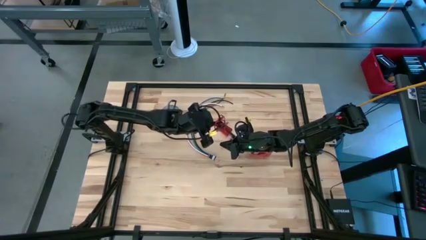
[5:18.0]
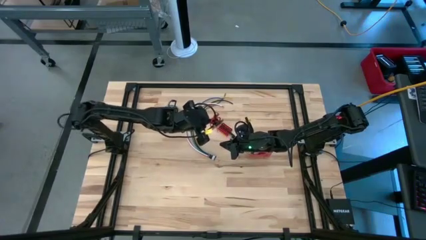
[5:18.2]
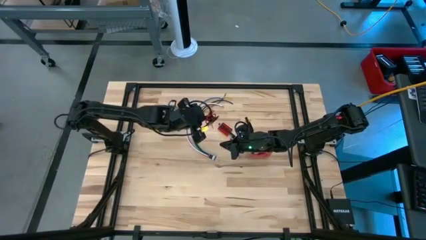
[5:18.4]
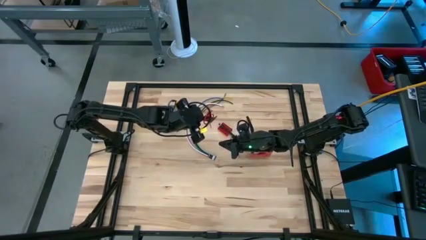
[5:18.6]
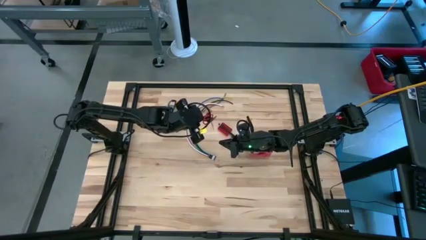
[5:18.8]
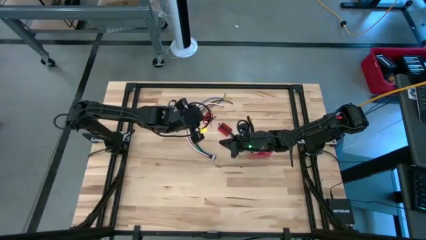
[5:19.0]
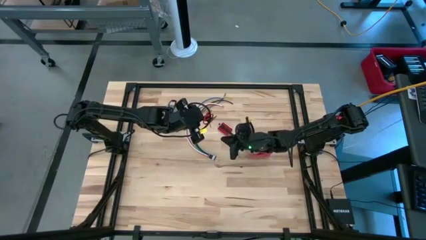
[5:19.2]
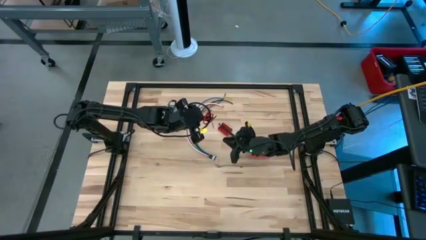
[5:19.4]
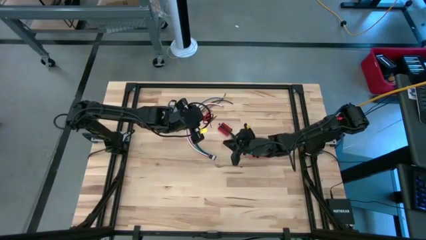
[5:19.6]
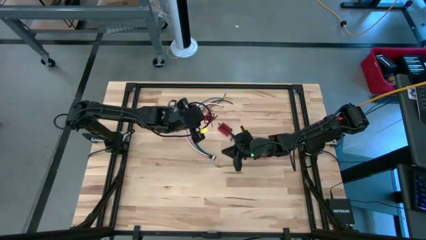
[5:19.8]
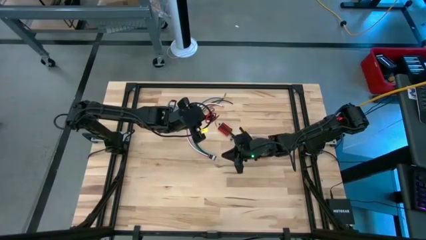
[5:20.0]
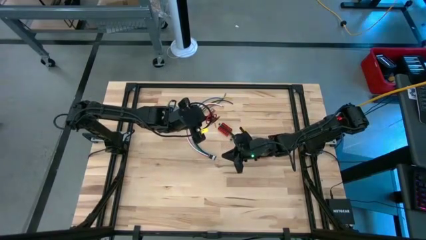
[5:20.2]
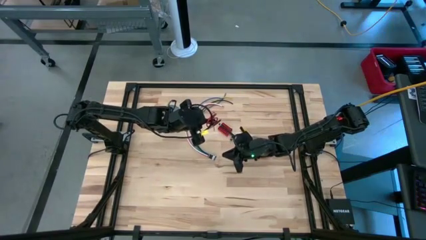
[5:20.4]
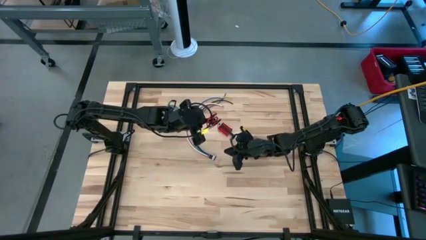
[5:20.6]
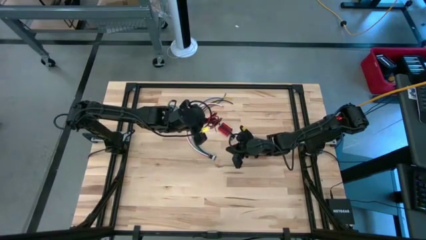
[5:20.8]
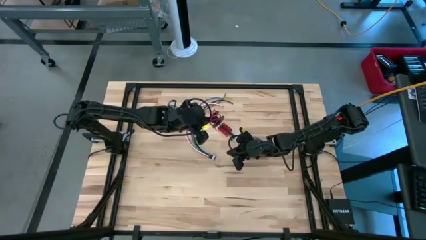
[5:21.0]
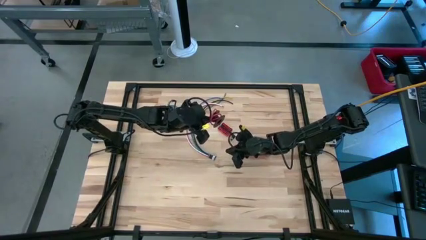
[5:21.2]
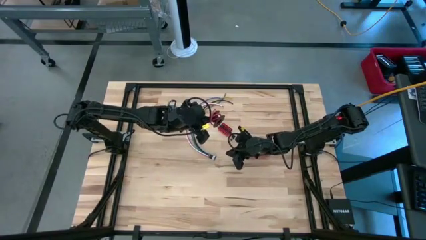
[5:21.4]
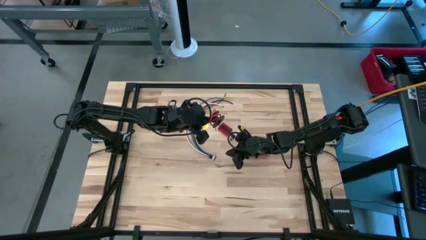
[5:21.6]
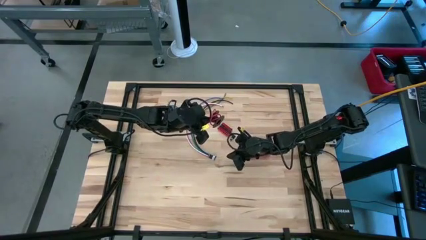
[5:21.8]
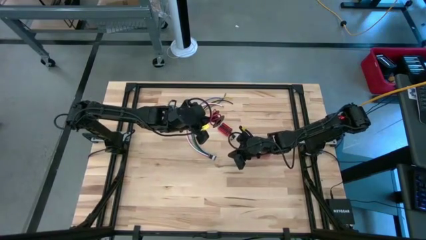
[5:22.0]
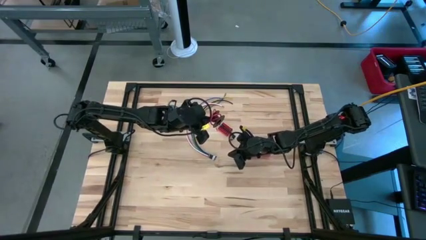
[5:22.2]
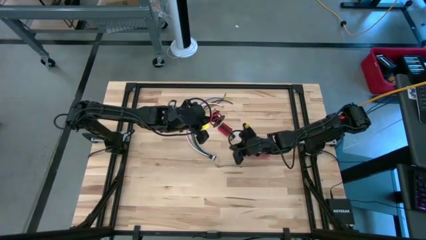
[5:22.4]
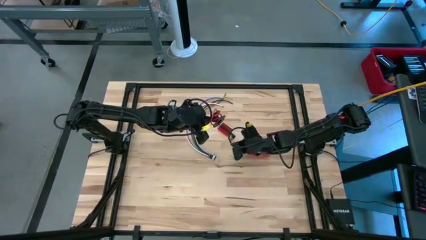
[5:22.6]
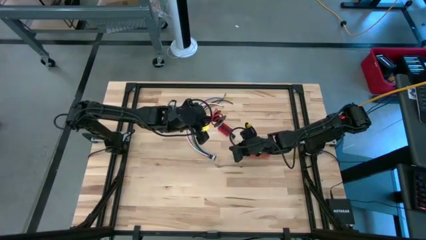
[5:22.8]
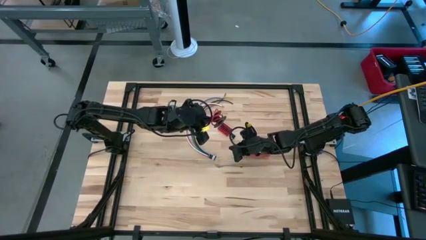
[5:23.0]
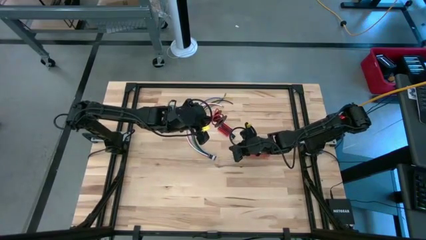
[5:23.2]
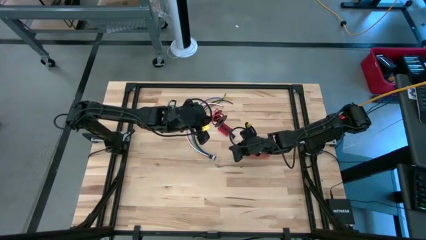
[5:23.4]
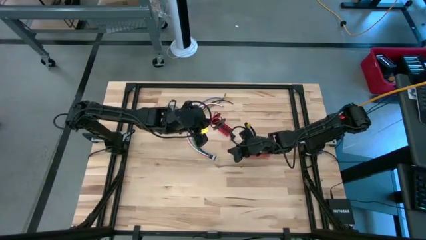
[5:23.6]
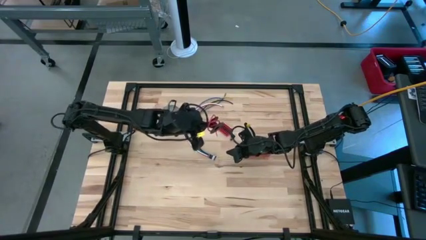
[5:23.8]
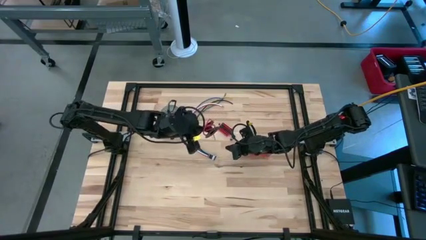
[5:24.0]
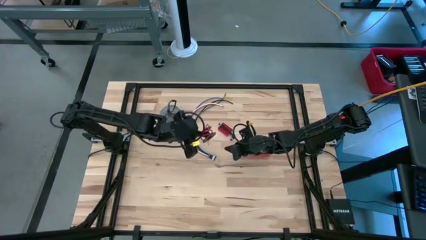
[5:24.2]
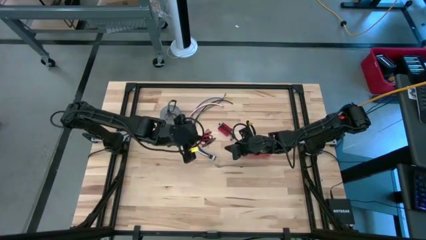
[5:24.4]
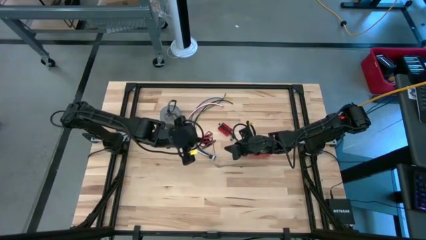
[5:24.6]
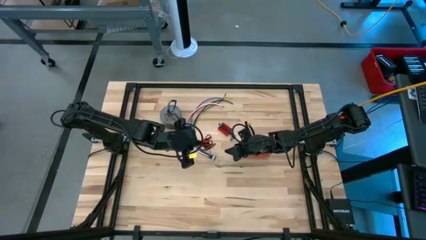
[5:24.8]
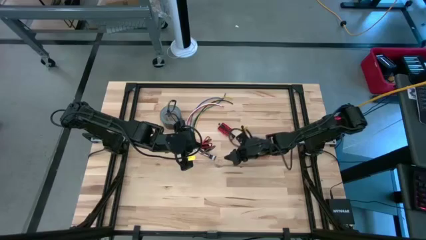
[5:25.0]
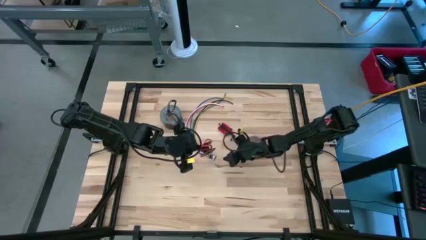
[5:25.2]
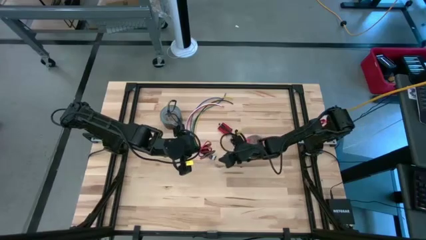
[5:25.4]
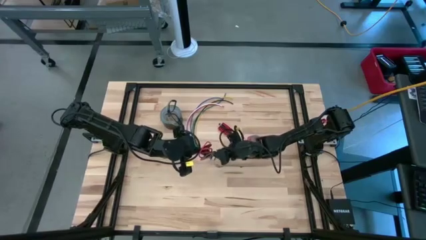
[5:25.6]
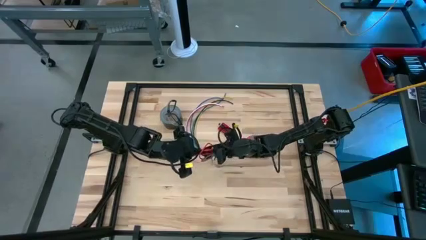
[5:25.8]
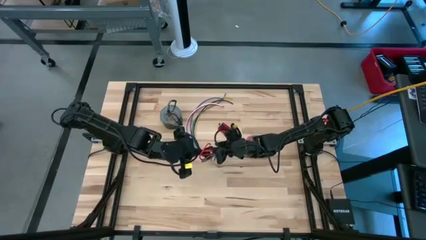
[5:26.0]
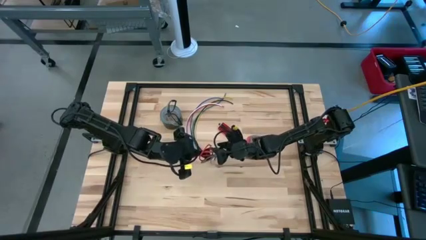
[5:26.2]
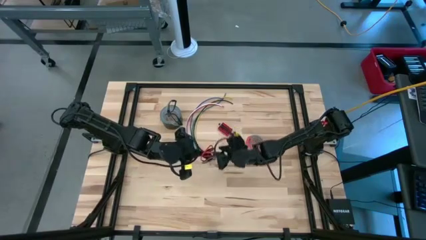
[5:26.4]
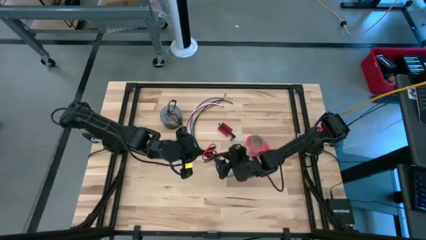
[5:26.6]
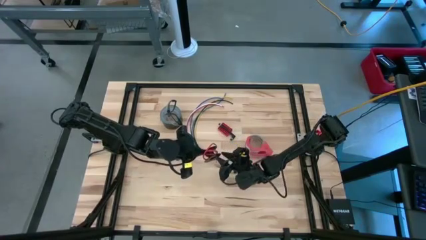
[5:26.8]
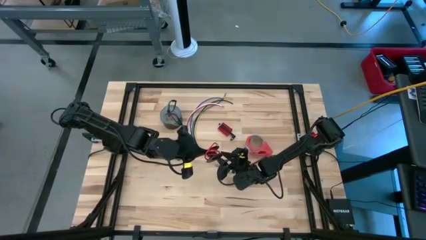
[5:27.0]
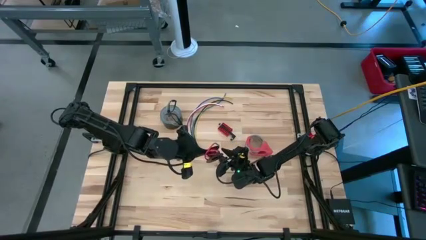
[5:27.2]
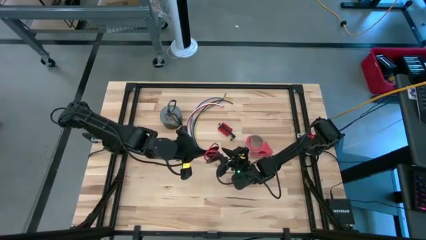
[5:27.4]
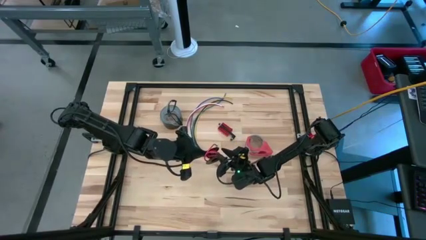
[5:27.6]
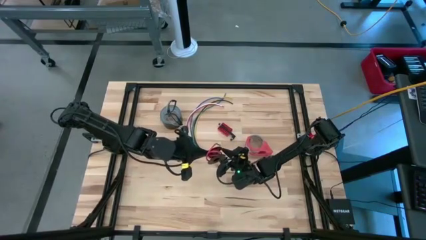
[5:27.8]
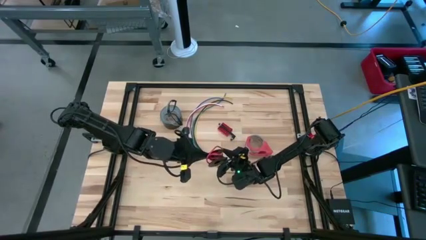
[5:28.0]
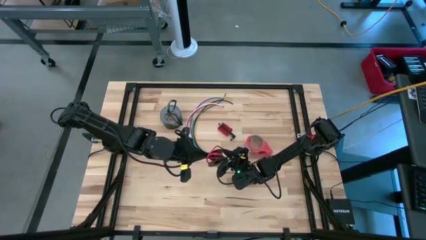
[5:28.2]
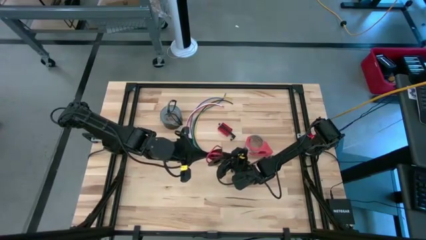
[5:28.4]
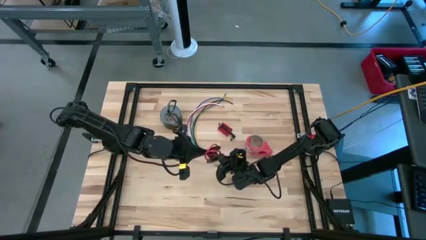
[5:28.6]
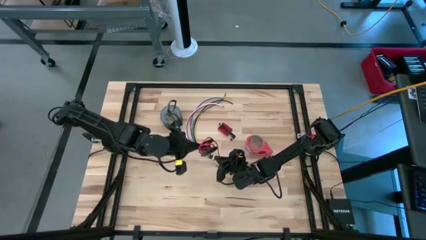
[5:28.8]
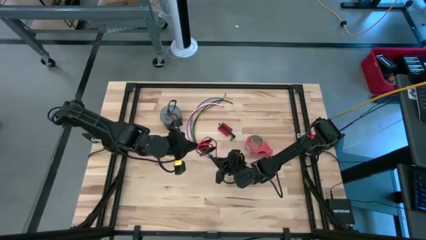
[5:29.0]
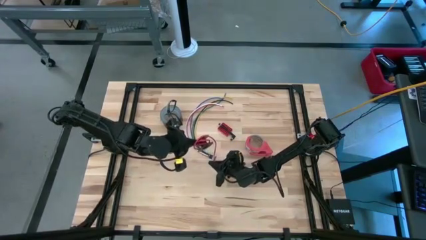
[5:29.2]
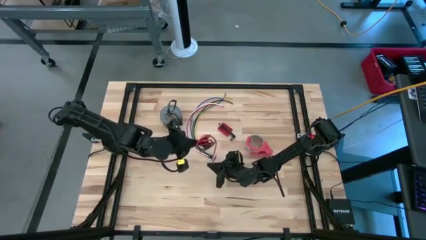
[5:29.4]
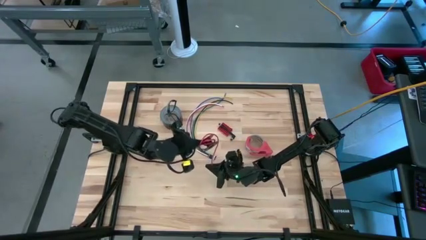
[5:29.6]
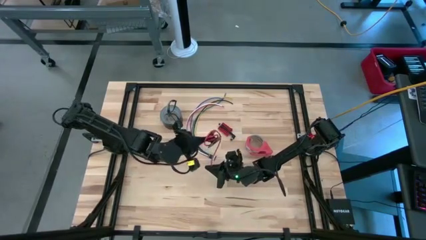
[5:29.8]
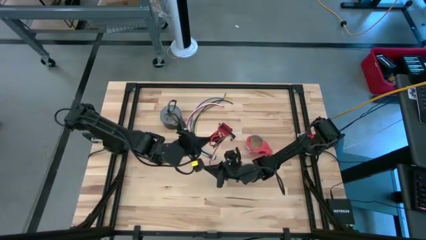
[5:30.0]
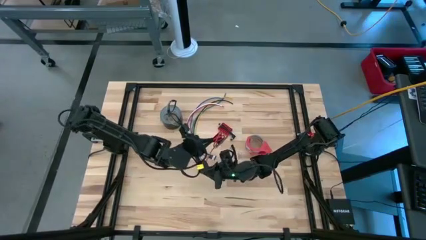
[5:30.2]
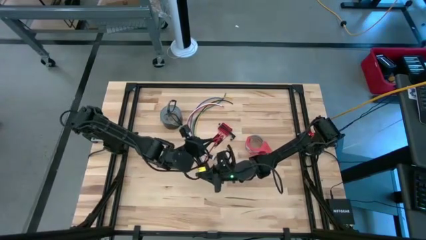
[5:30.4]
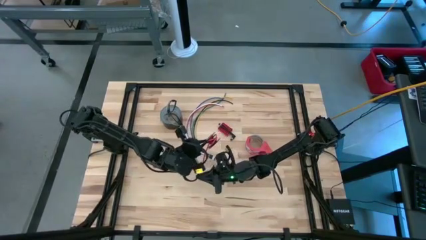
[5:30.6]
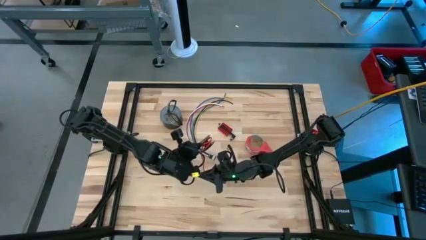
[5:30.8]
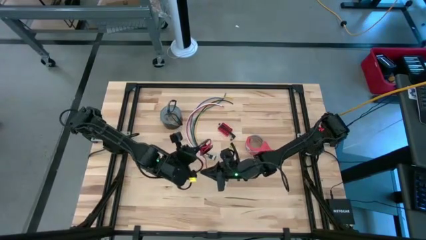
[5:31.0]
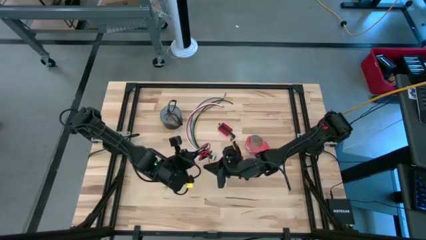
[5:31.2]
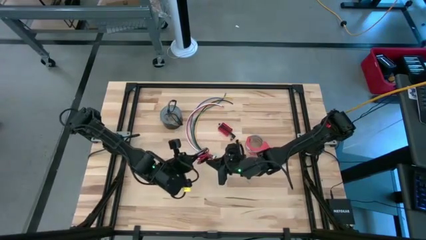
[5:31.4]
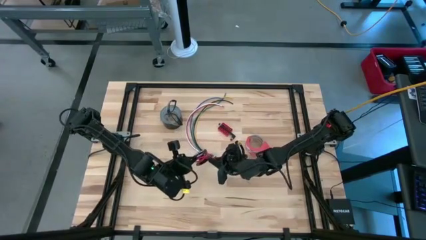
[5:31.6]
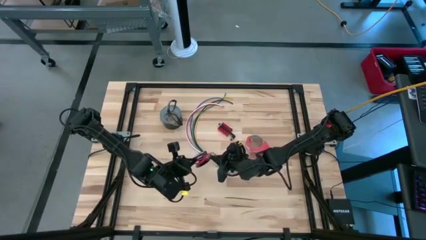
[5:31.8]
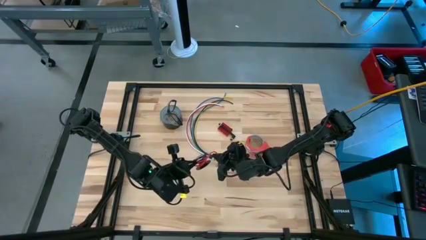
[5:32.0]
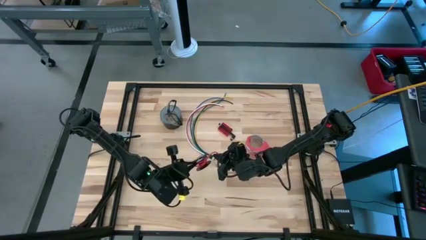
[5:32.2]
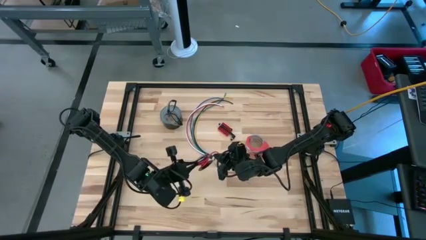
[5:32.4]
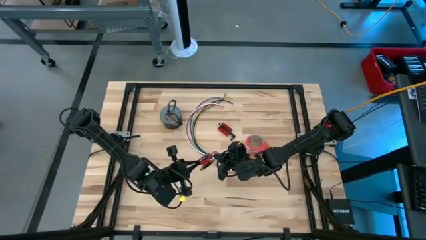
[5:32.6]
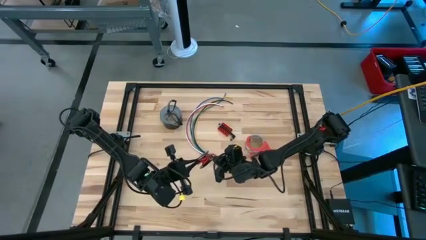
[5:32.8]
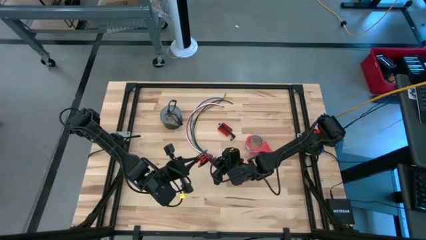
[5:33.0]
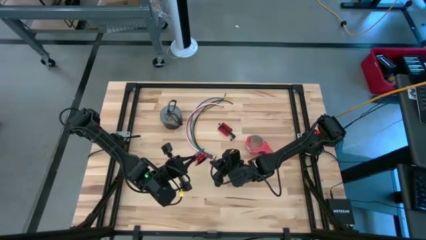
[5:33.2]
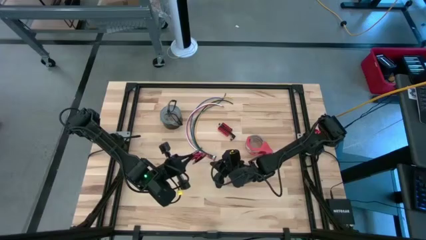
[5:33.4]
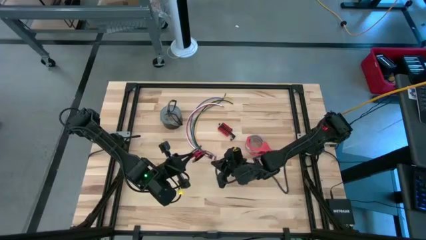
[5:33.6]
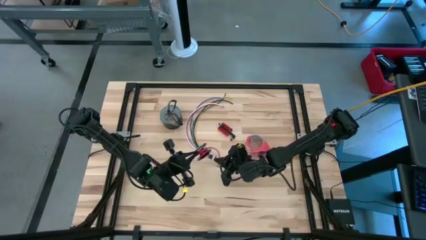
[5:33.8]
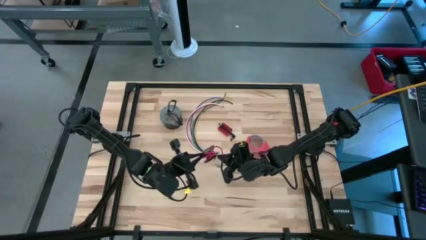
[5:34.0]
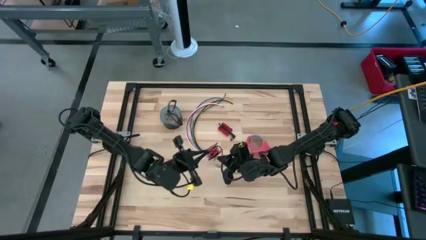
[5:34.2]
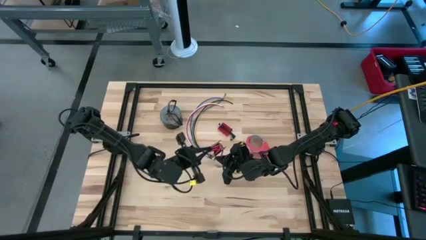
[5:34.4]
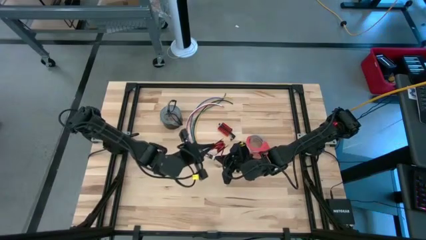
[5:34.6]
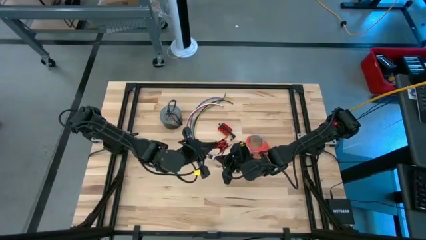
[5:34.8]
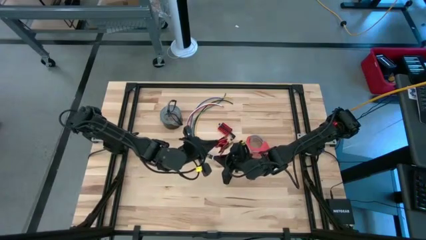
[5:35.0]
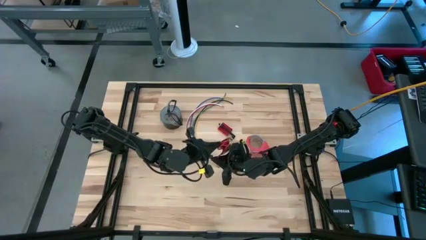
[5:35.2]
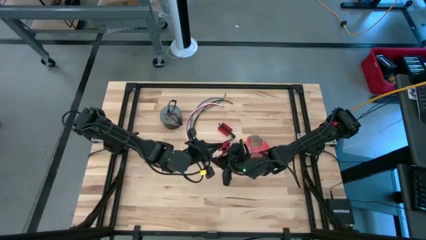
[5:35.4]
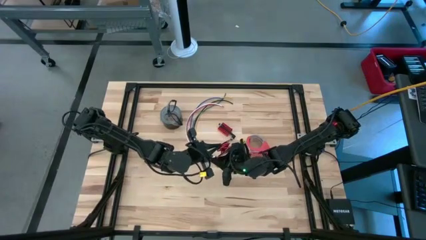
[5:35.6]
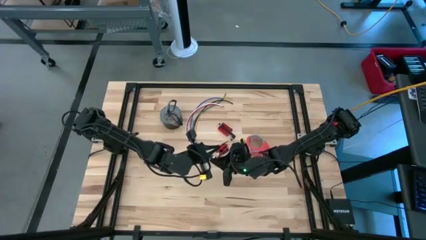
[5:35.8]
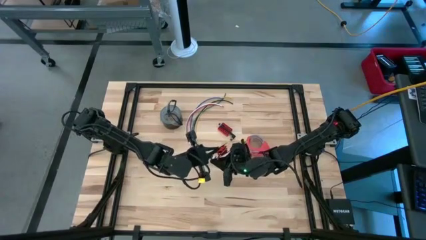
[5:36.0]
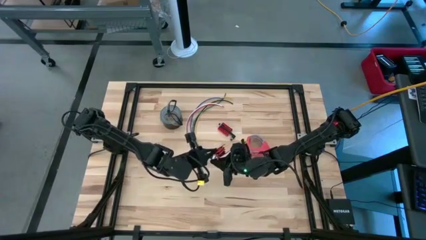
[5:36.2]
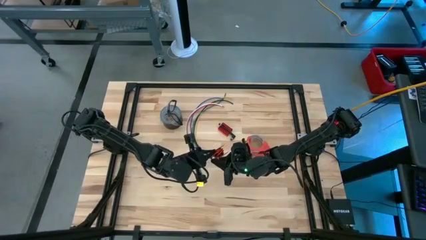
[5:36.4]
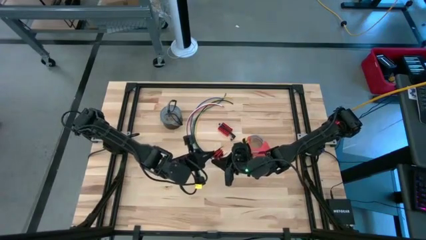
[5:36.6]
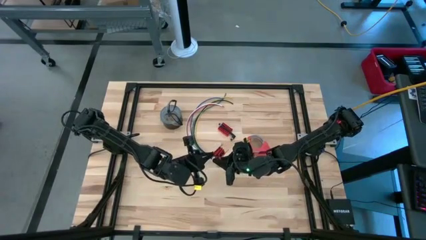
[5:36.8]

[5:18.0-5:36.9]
Task: Coil cords
Coil the red wire onto the spool
